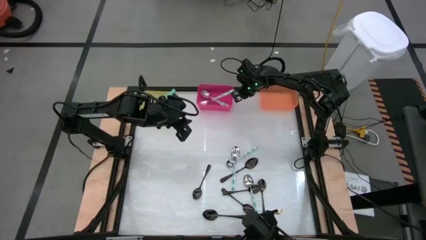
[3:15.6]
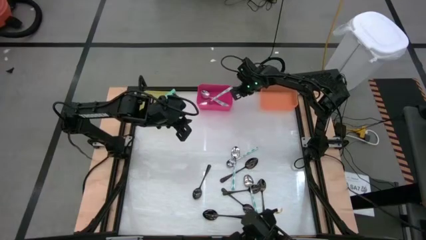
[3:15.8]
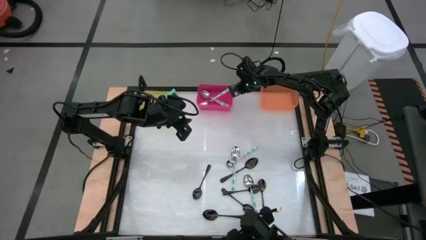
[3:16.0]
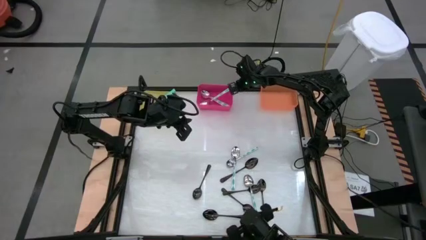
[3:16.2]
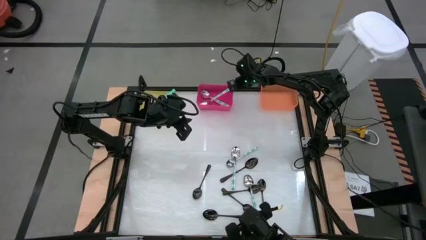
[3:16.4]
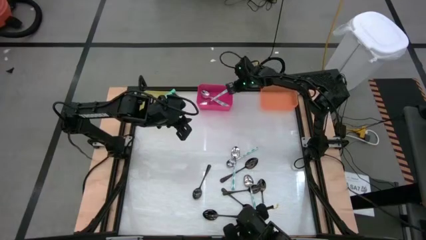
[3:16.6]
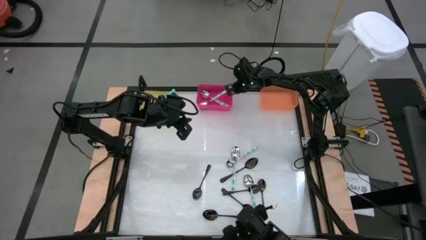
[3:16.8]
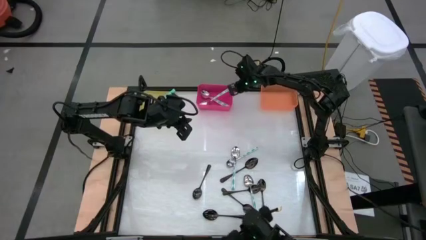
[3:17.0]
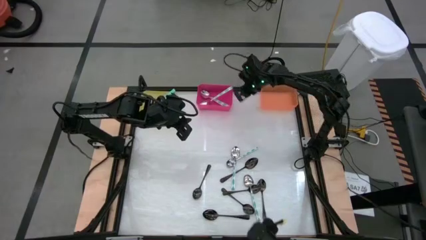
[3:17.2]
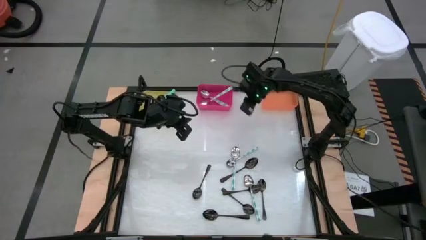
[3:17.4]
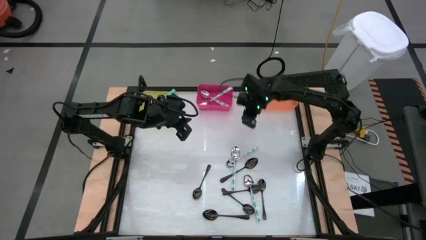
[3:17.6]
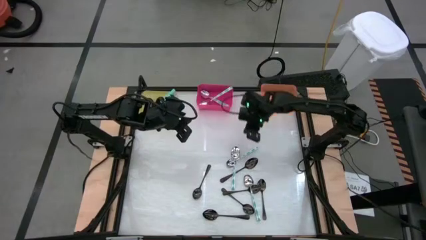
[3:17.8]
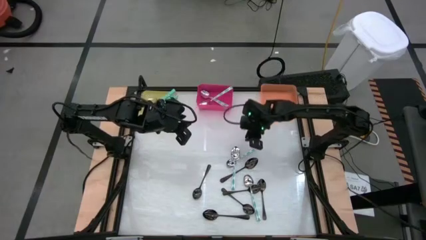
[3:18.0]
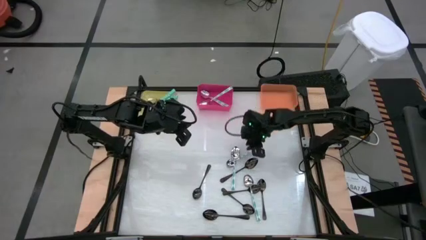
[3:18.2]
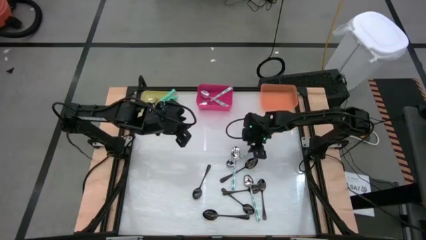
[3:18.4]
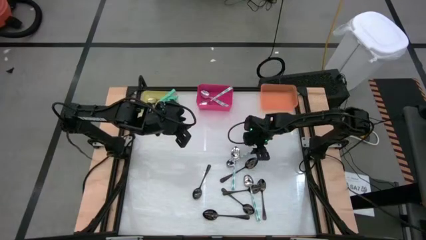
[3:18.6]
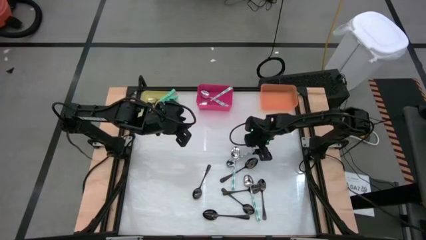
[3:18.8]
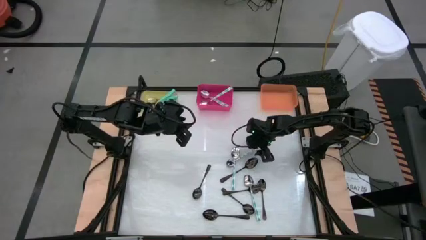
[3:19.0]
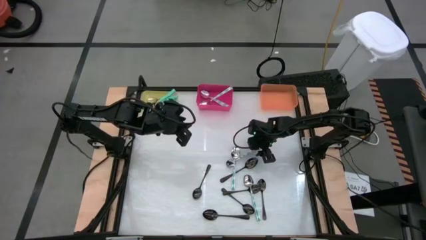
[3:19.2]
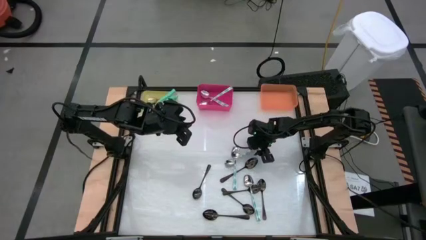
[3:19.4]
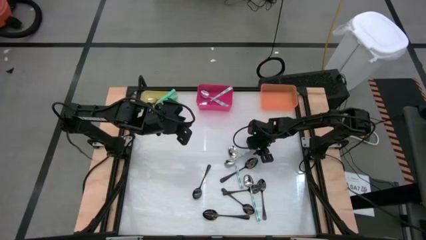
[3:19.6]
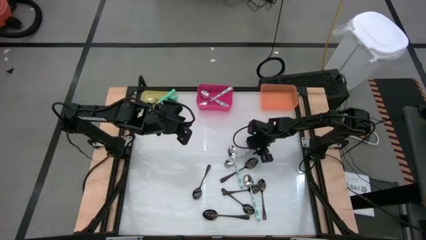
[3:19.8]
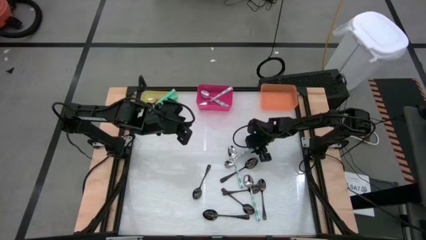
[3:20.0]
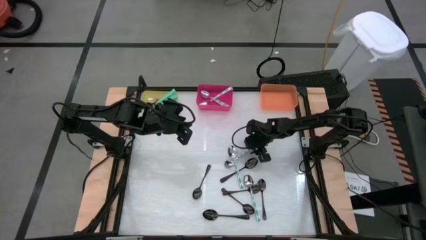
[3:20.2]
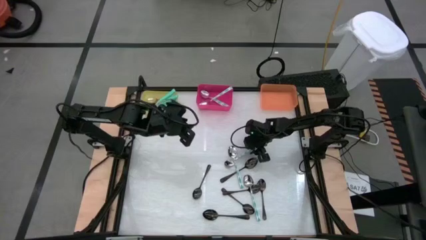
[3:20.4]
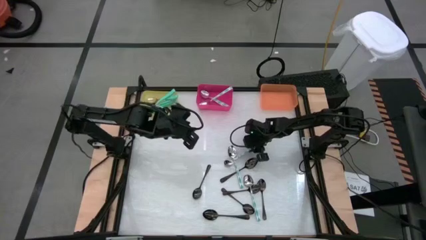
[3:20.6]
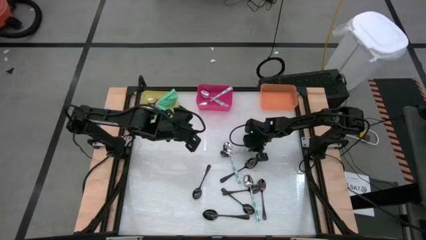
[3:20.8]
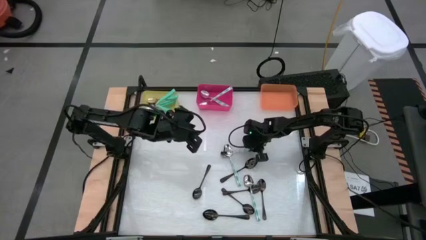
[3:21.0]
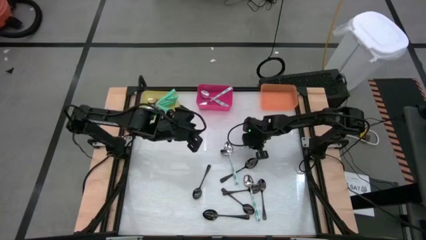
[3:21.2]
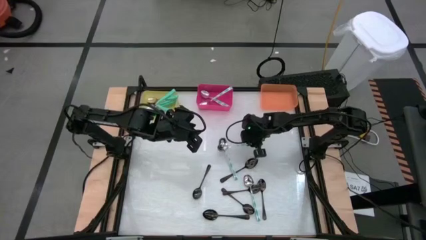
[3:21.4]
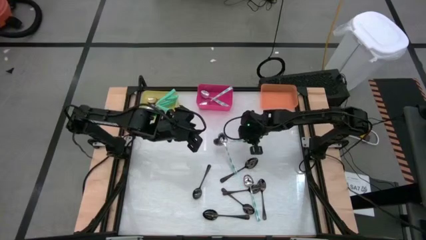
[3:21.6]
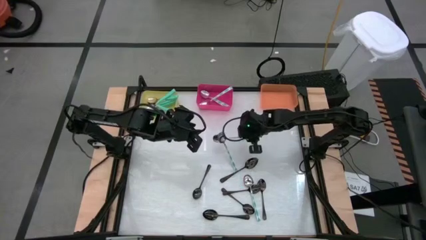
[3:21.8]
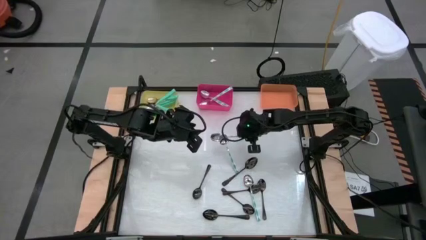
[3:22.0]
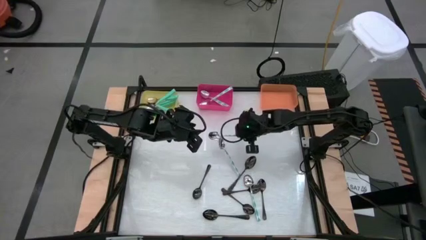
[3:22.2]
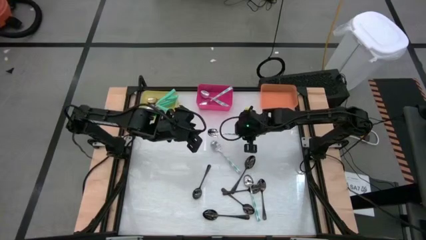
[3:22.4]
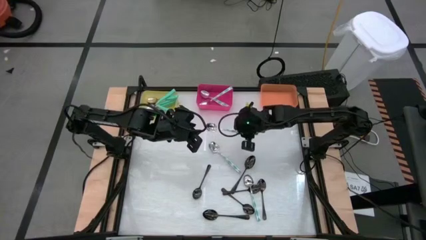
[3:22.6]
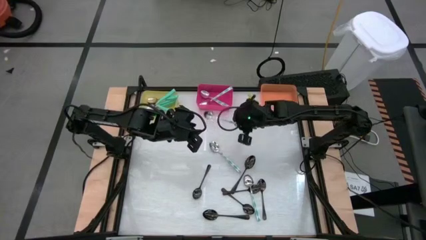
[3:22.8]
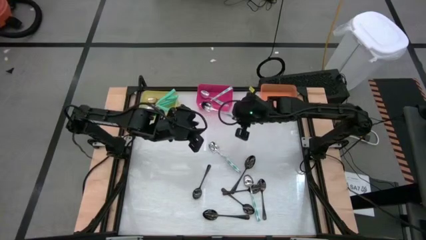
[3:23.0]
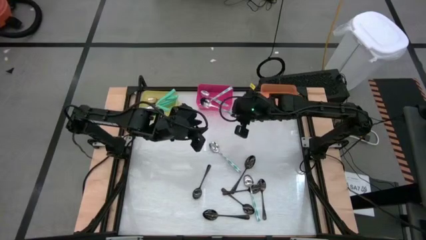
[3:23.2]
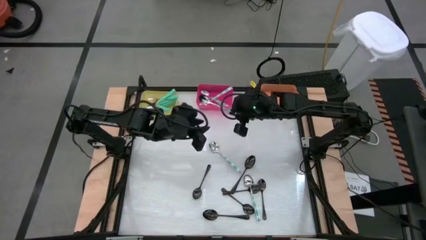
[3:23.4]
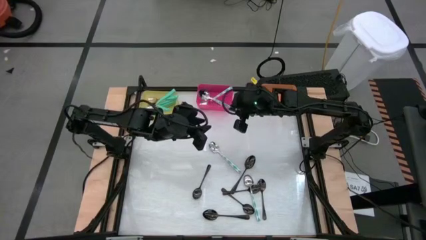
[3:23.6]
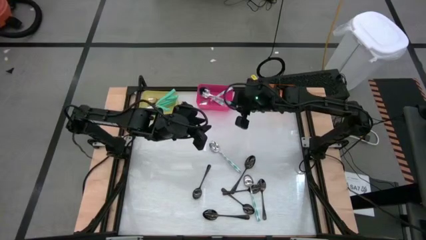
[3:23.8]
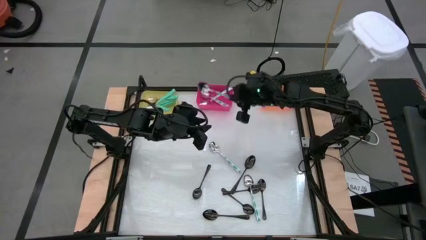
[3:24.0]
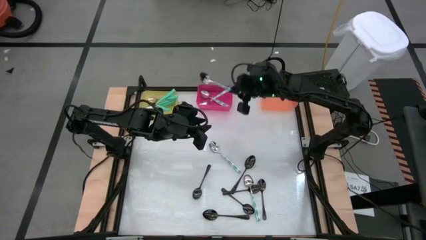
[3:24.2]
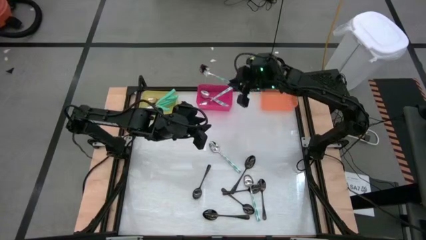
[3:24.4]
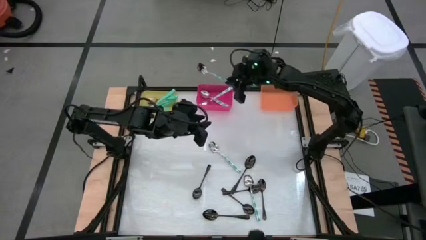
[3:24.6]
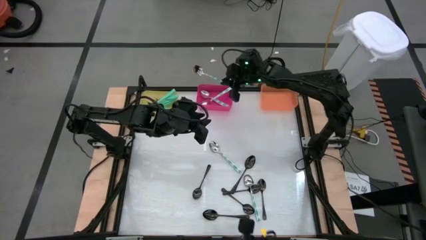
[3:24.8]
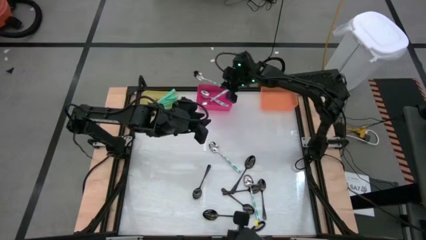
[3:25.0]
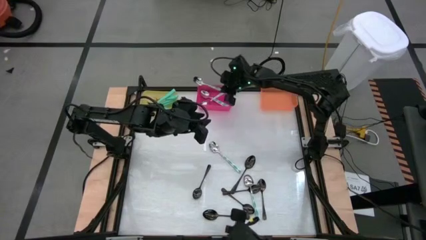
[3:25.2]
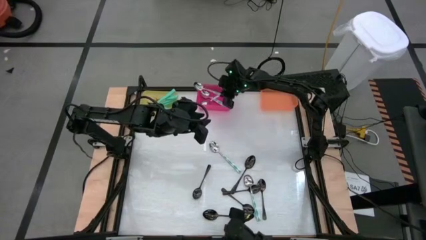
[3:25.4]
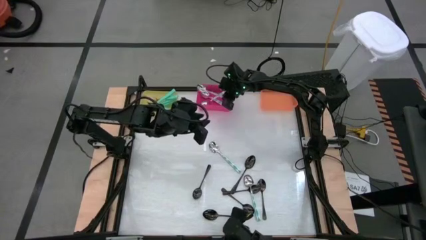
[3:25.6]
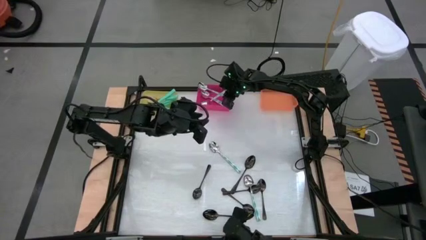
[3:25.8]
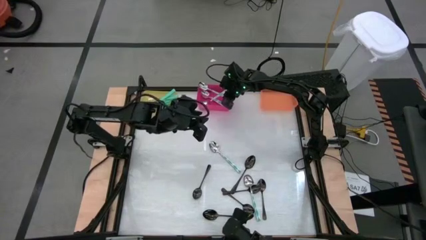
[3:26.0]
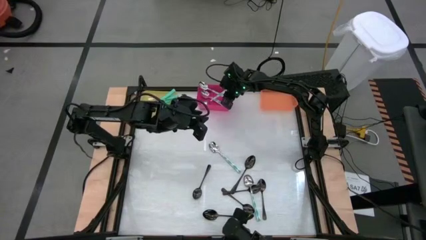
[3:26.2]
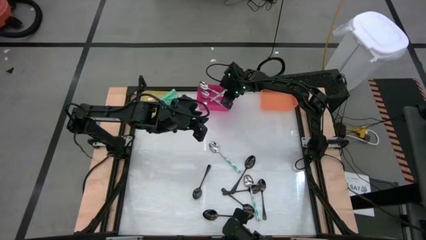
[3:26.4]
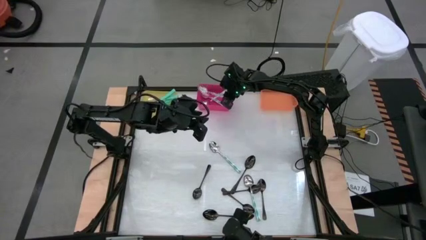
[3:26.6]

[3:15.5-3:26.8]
Task: Sort silverware by color (type)
Put the white patterned spoon into the pink bin

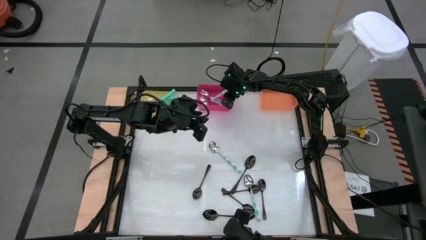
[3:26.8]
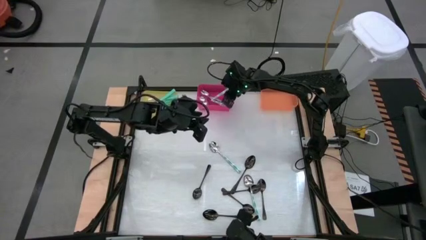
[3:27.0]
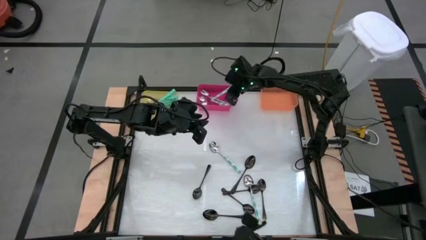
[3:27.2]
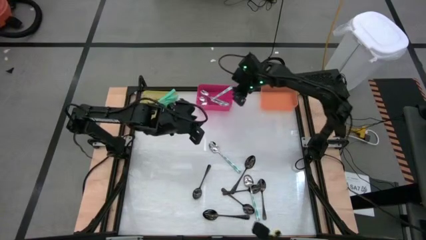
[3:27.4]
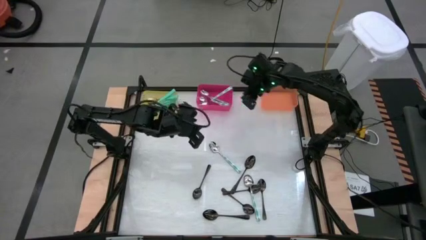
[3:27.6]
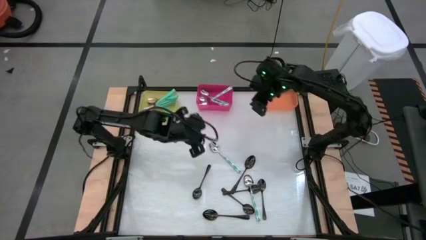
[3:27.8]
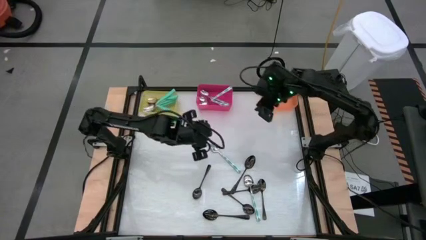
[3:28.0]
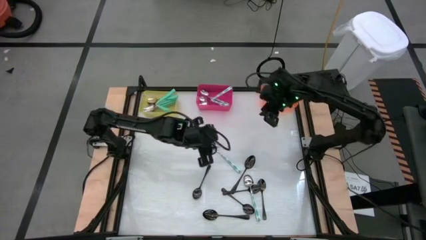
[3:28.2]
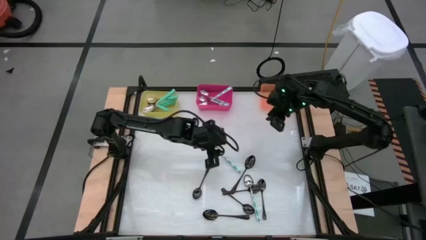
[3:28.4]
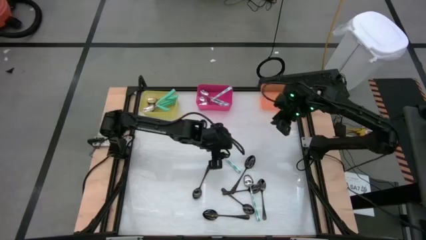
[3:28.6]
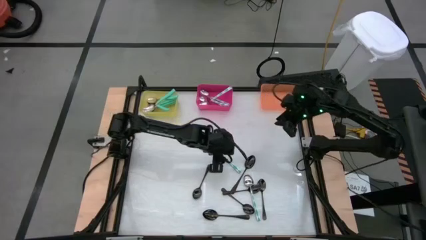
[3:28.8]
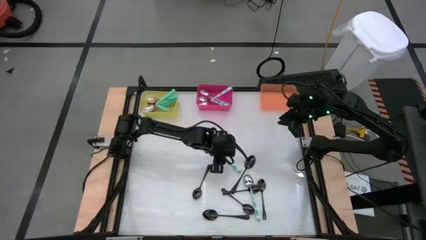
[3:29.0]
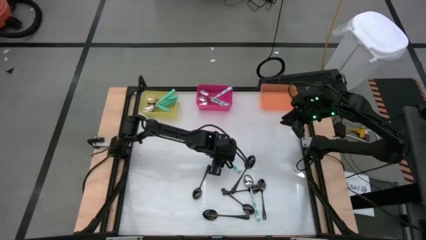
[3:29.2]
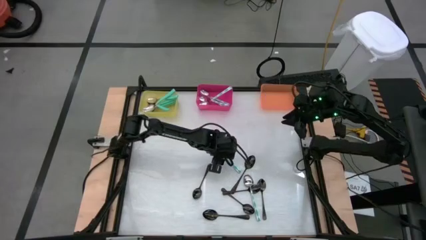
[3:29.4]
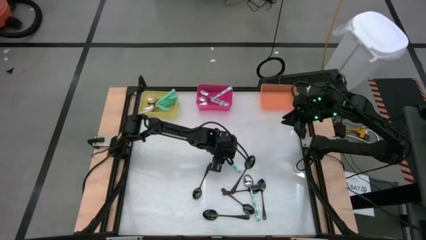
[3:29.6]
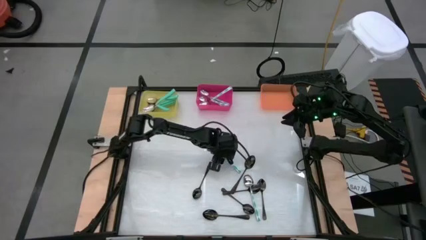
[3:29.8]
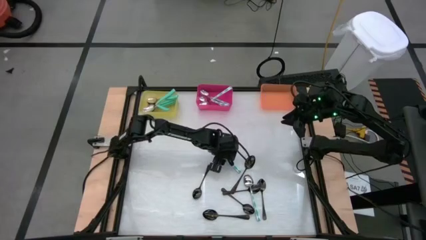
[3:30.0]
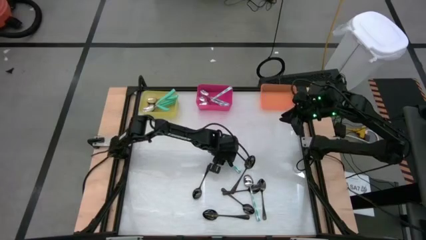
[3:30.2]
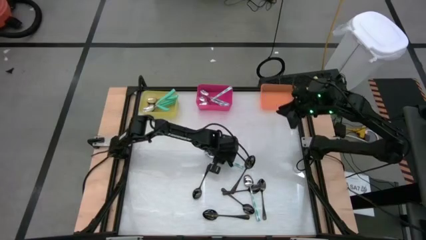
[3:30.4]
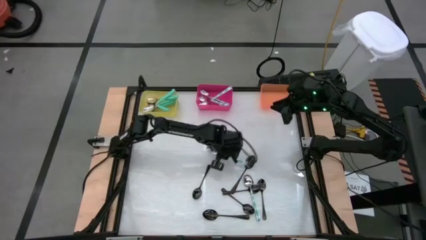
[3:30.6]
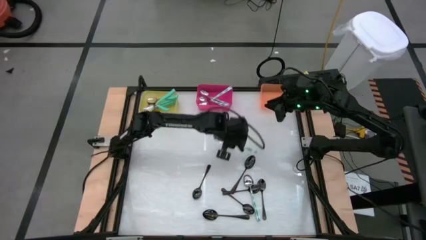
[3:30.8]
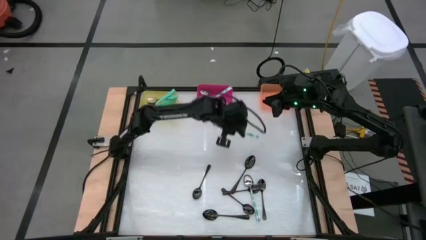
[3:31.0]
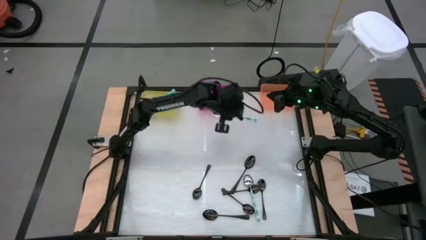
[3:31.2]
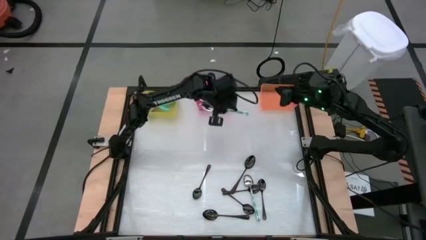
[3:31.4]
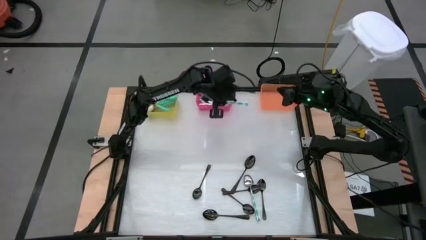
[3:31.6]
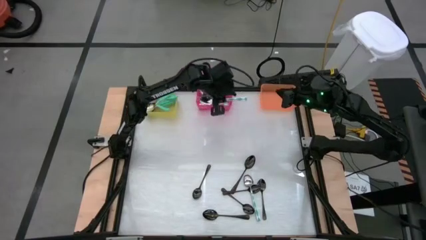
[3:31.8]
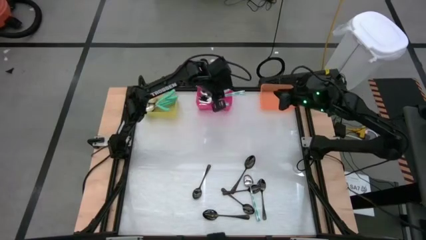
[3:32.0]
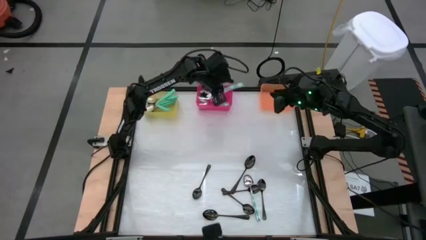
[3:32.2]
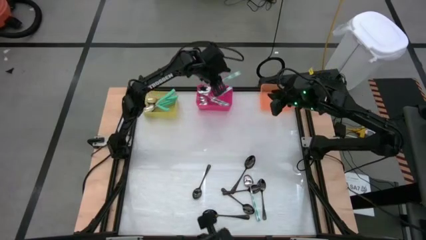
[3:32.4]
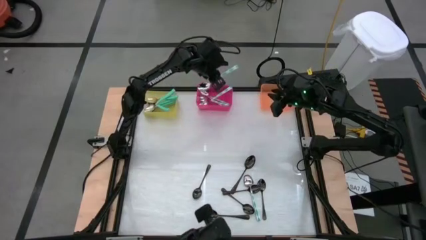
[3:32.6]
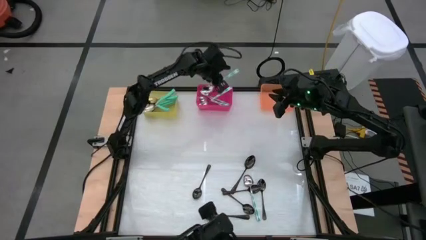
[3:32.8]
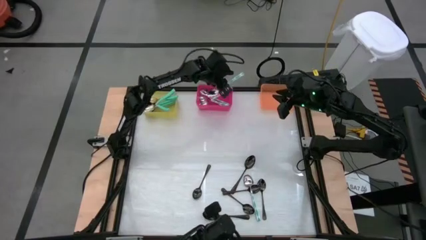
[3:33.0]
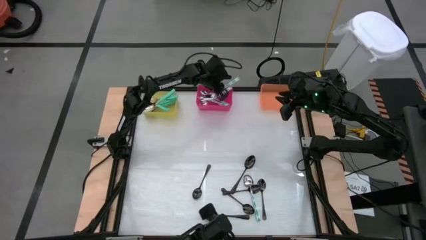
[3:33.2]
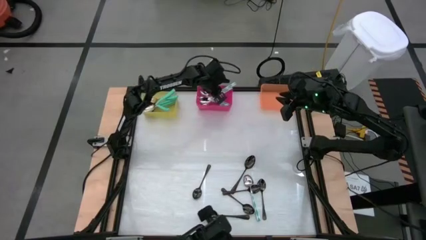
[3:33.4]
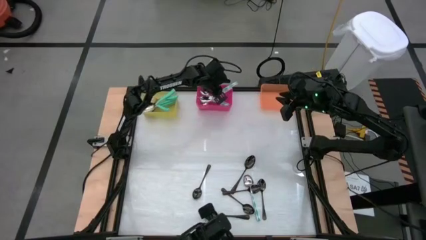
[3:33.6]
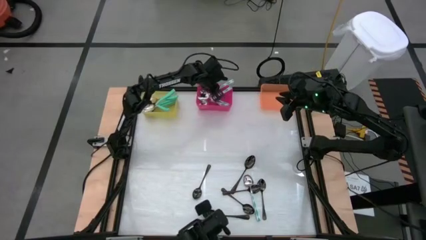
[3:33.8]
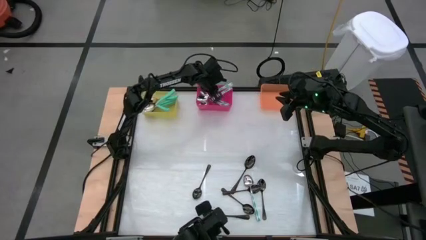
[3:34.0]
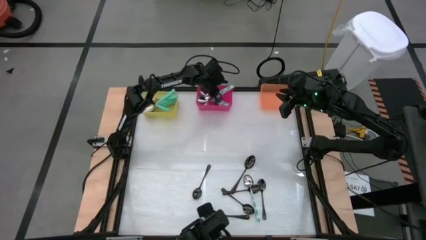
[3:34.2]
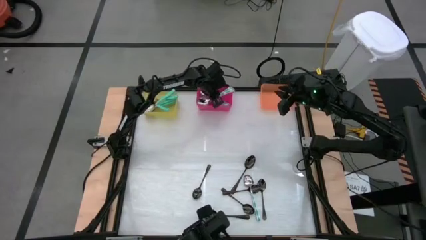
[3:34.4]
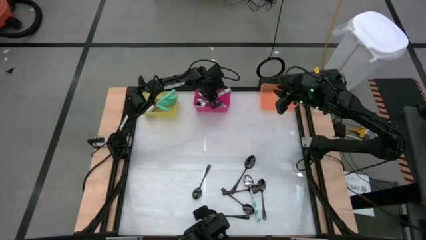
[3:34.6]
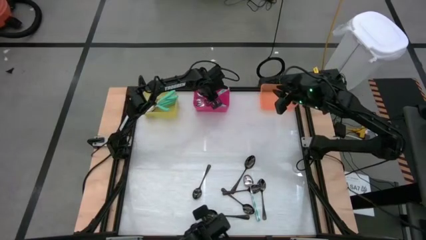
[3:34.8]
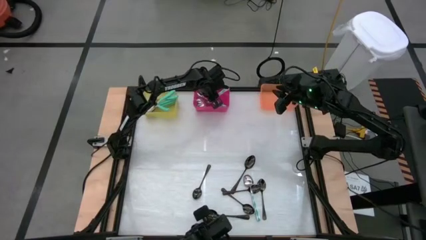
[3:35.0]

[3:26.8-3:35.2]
Put the white patterned spoon into the pink bin
